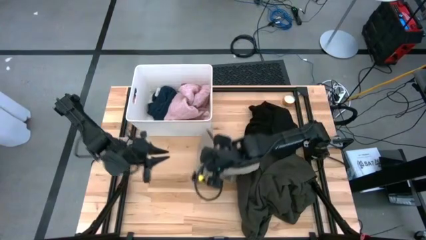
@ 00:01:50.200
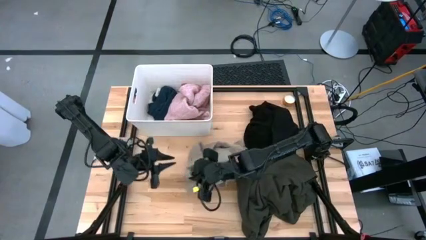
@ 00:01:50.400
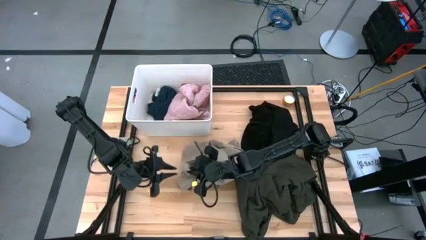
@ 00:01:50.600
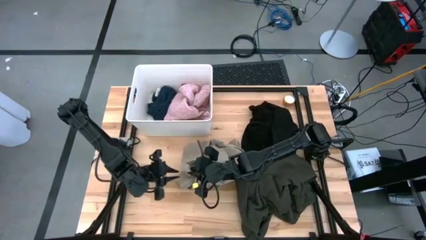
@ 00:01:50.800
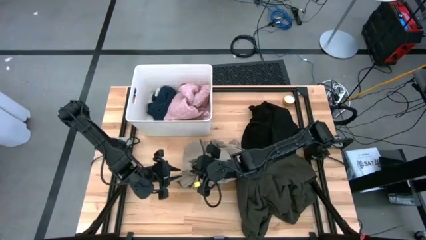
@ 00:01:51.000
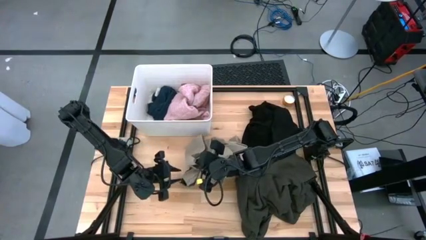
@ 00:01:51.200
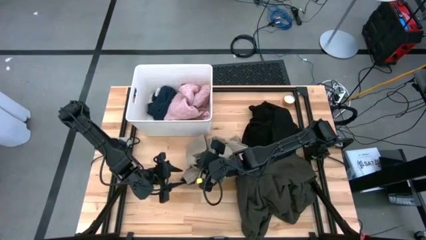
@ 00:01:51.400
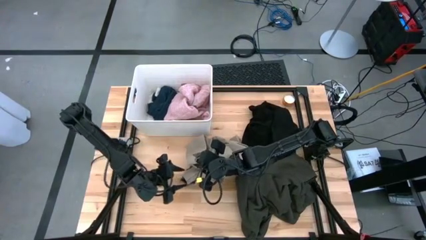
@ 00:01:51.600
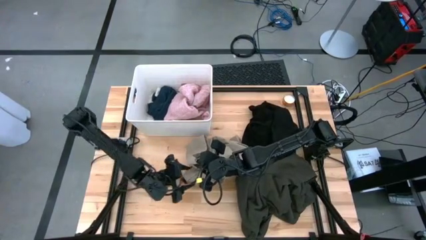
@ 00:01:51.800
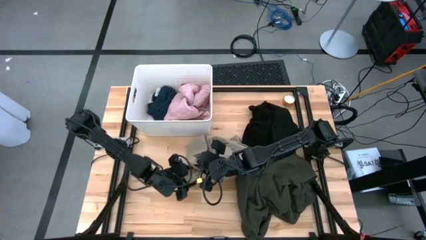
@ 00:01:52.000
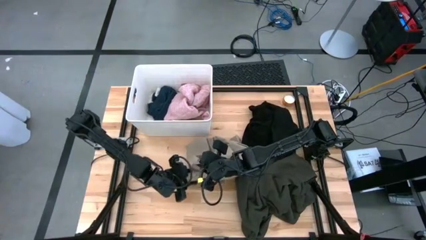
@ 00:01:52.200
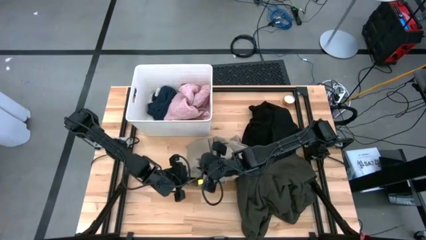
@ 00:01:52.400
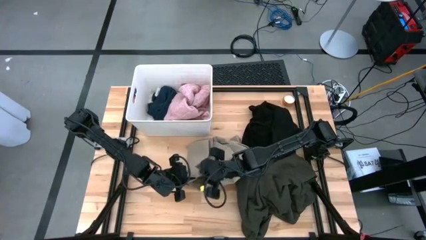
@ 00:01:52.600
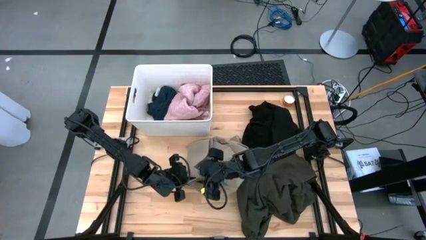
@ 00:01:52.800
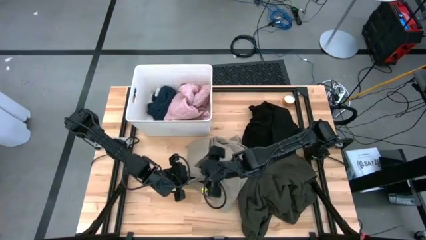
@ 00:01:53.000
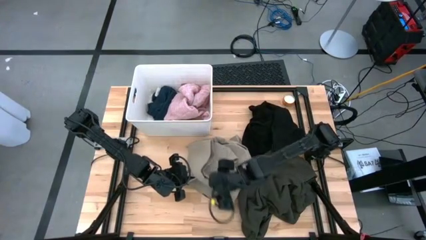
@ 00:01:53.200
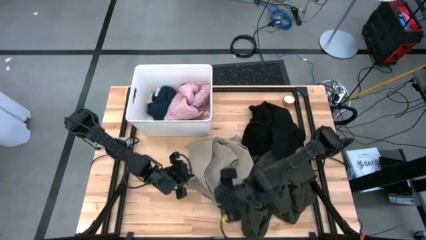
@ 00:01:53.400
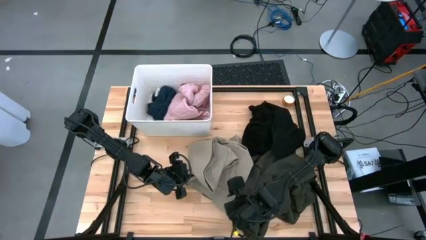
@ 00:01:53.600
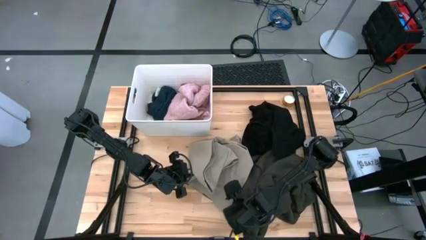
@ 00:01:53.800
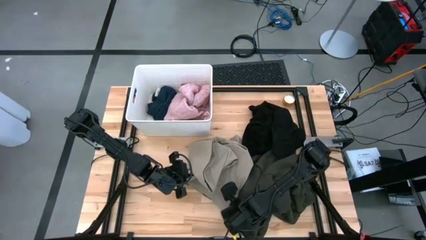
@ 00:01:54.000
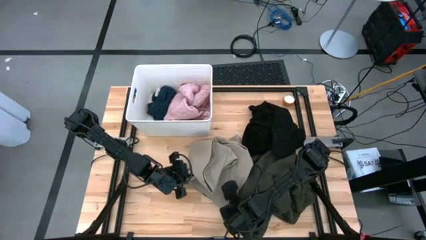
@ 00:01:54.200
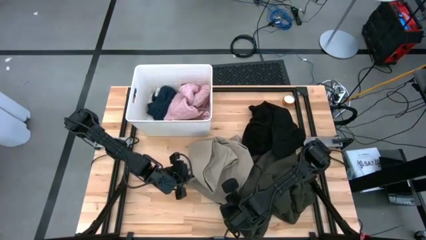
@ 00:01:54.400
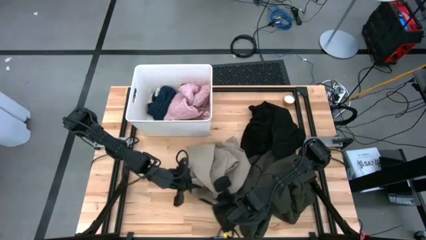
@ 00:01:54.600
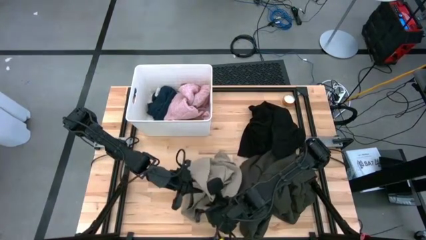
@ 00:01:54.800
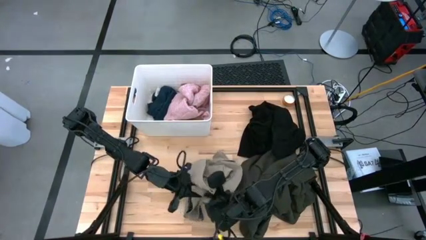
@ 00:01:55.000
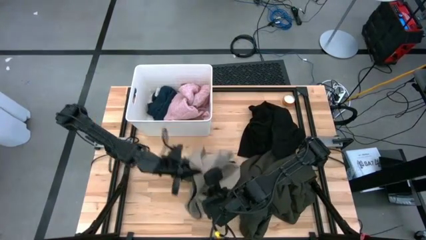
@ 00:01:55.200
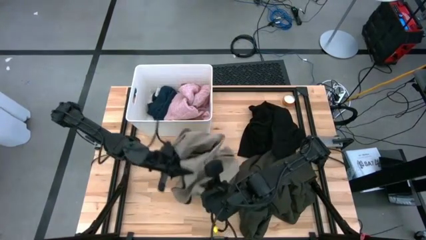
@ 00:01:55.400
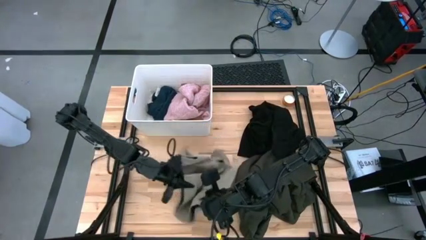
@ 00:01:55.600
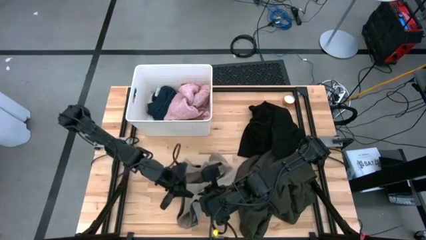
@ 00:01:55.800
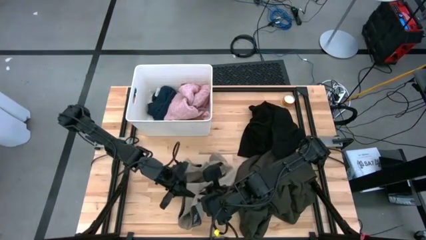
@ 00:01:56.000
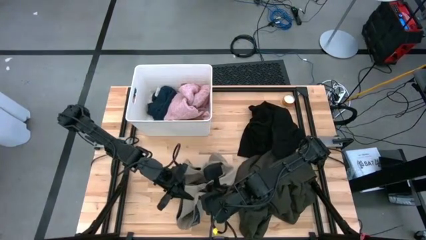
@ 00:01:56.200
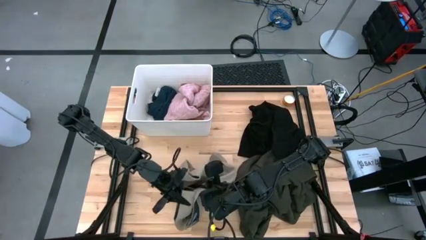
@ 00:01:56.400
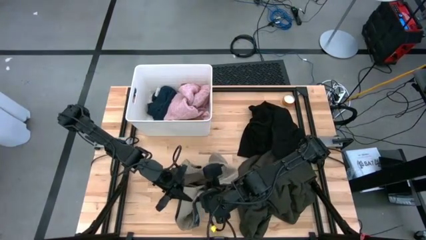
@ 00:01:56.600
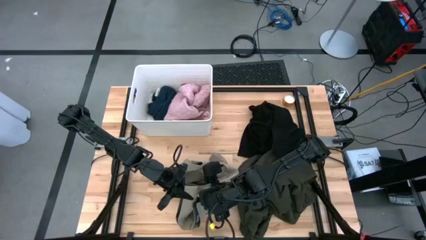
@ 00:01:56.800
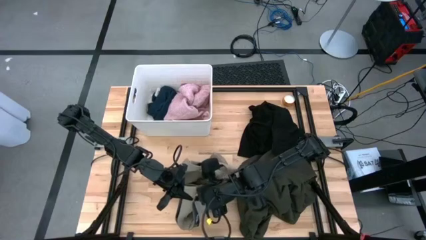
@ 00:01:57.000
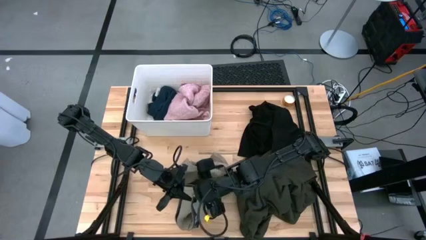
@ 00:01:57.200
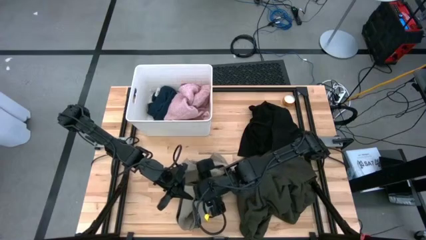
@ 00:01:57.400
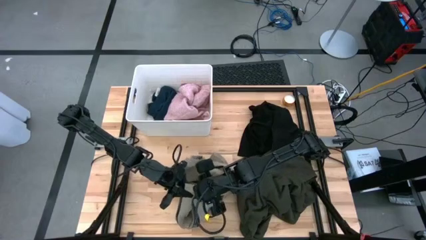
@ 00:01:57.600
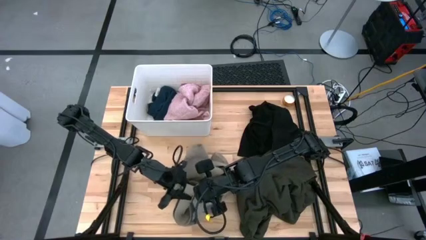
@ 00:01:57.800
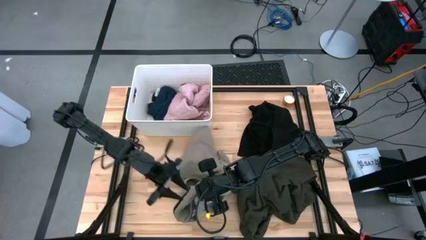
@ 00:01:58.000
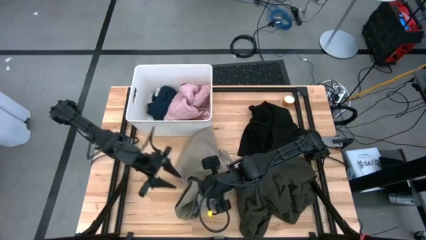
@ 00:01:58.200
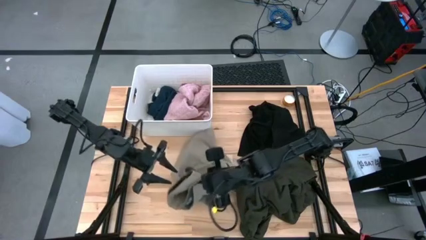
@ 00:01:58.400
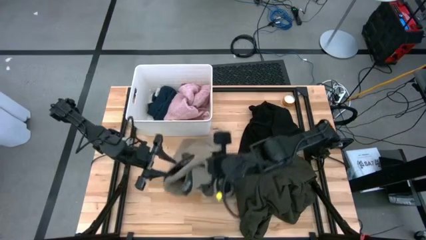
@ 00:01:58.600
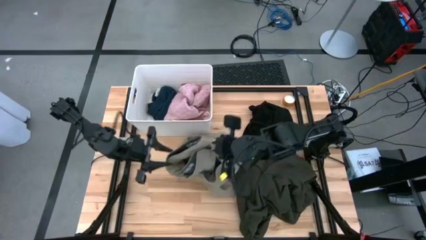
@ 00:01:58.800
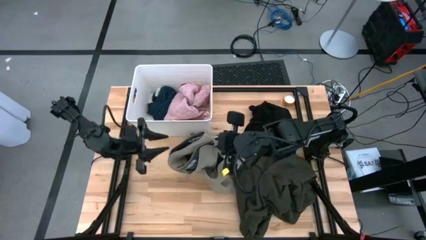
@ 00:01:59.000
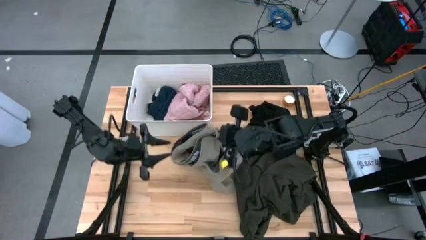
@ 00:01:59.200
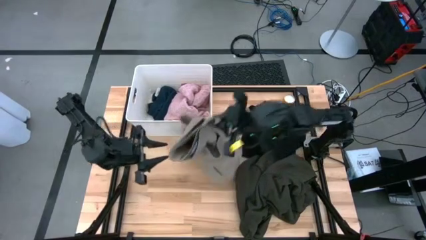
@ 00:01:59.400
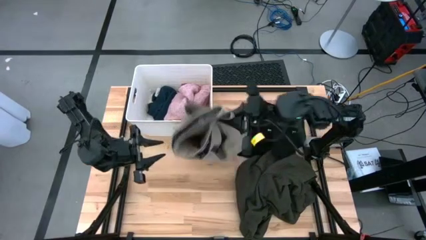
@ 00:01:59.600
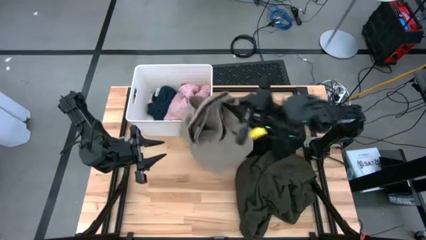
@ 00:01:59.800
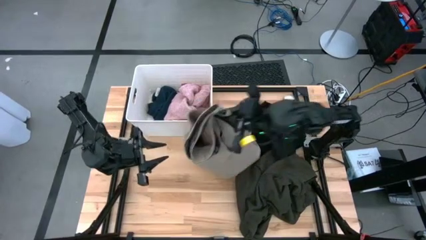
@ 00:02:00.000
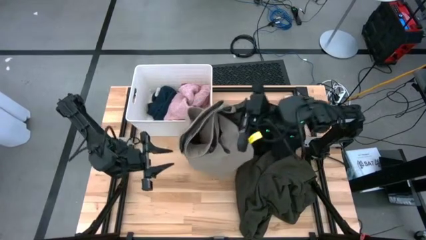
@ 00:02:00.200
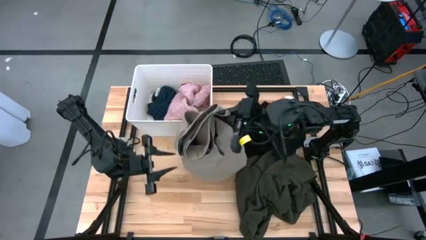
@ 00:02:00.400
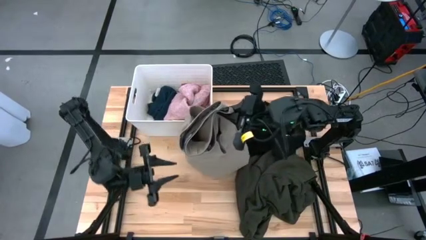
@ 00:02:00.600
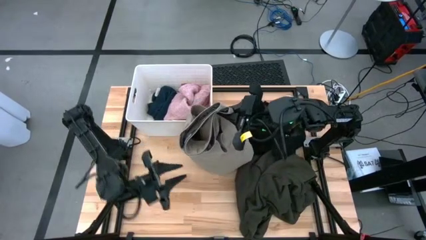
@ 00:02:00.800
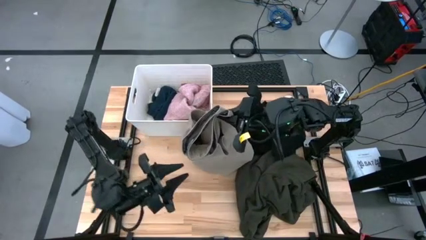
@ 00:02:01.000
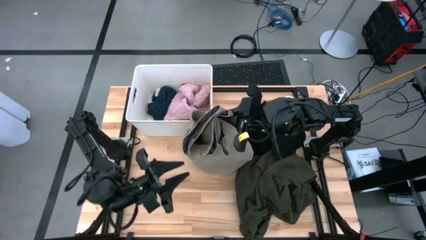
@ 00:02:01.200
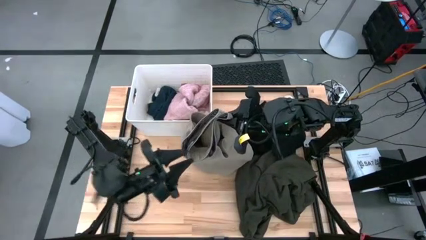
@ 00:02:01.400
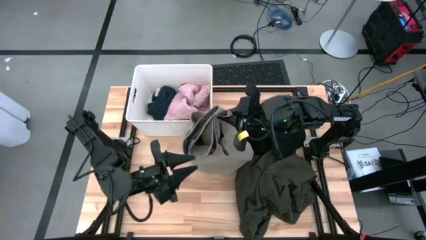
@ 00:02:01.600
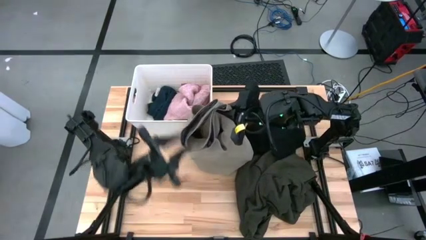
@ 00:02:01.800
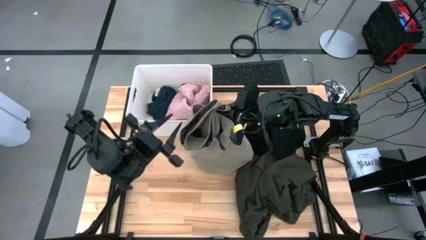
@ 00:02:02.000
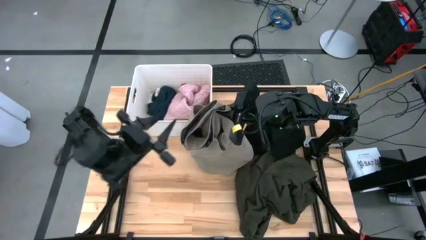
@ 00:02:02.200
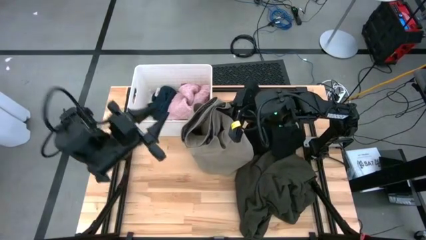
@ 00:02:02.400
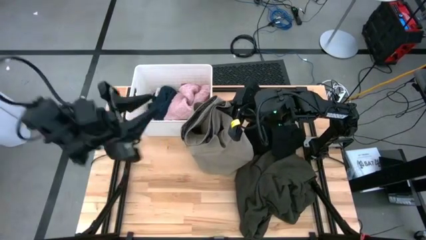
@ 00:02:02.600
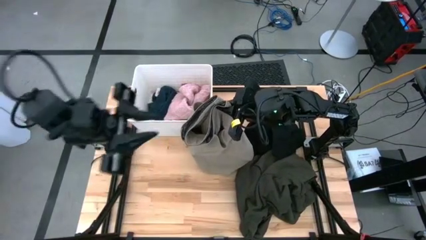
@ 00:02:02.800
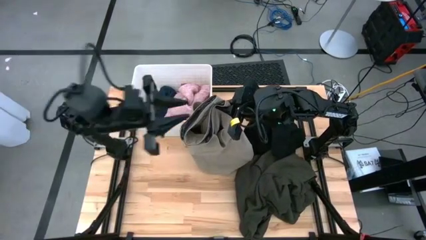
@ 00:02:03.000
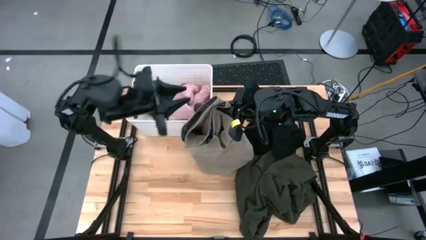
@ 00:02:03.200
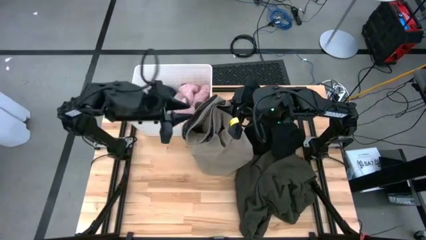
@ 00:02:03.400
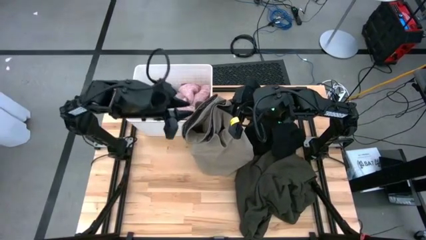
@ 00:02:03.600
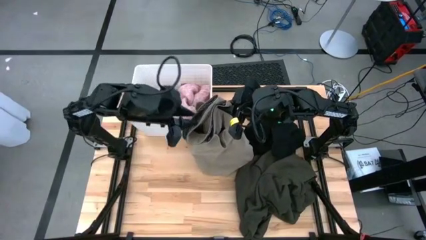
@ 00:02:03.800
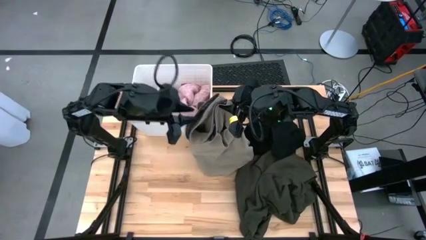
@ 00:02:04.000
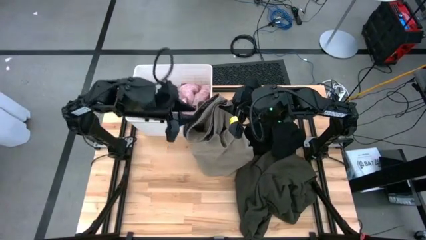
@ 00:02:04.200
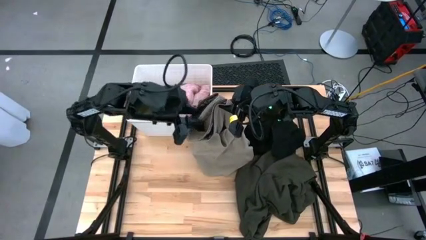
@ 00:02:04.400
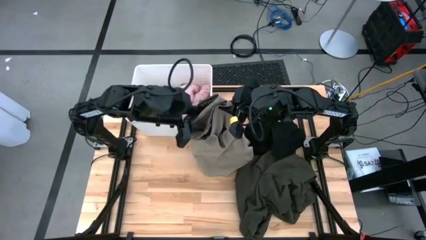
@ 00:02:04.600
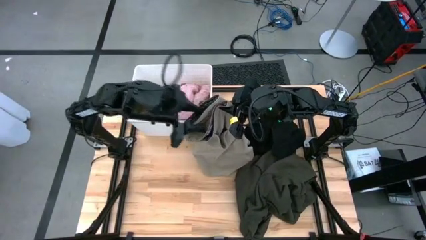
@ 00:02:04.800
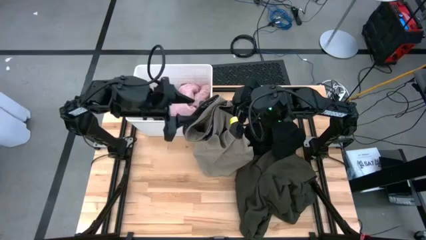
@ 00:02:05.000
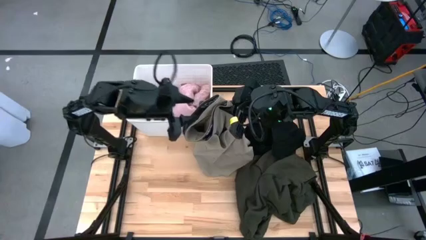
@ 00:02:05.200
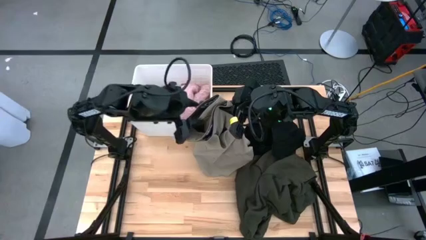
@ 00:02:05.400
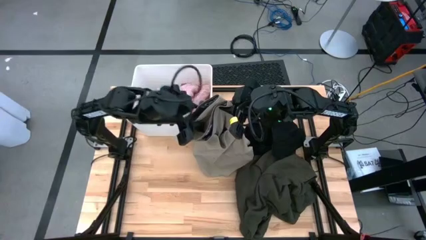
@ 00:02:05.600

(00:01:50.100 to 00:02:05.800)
Task: Sort clothes
Put the brown shorts into the white laundry bin
